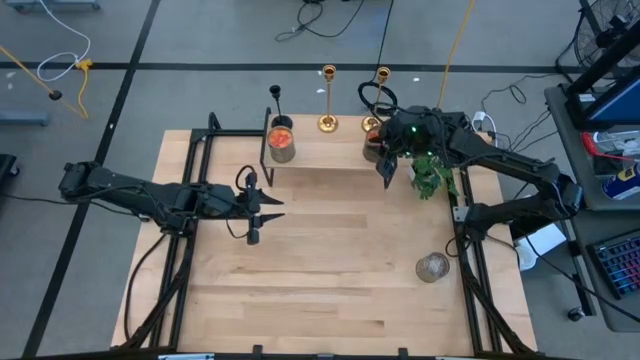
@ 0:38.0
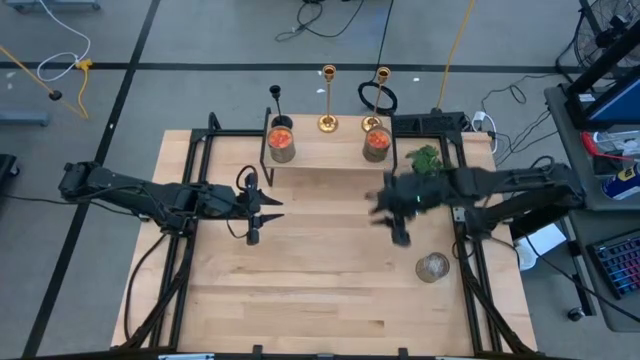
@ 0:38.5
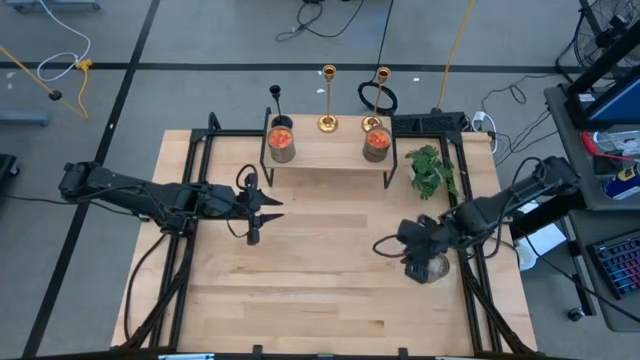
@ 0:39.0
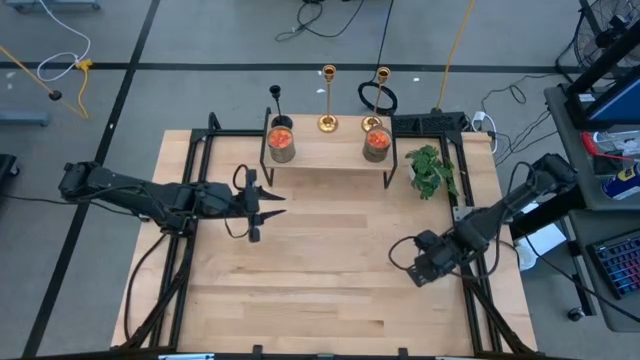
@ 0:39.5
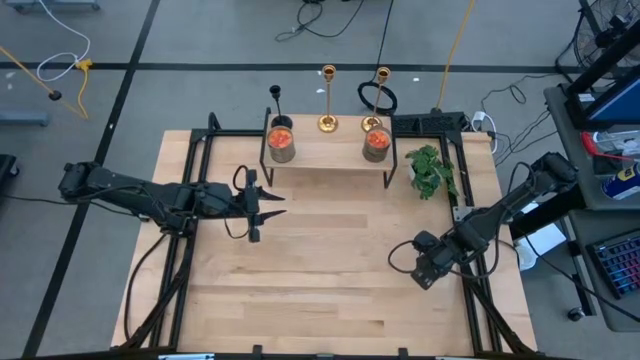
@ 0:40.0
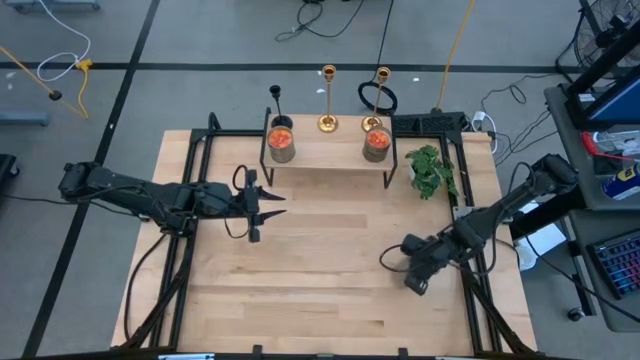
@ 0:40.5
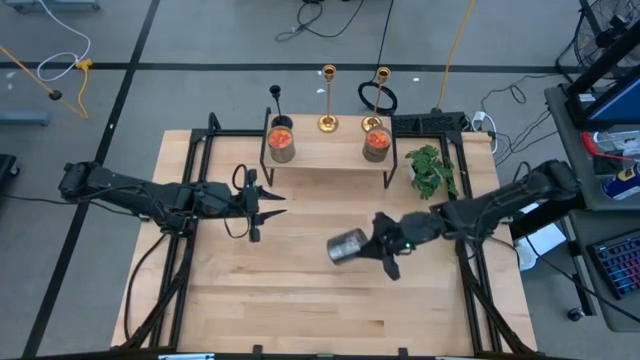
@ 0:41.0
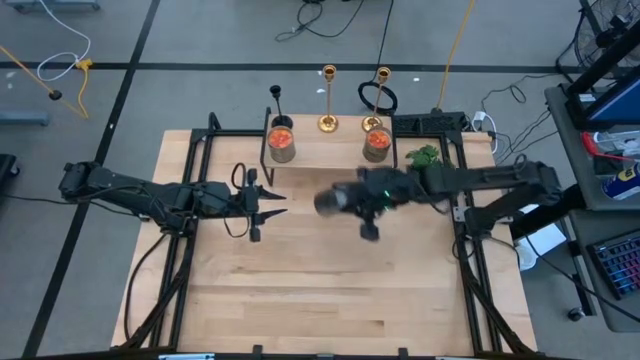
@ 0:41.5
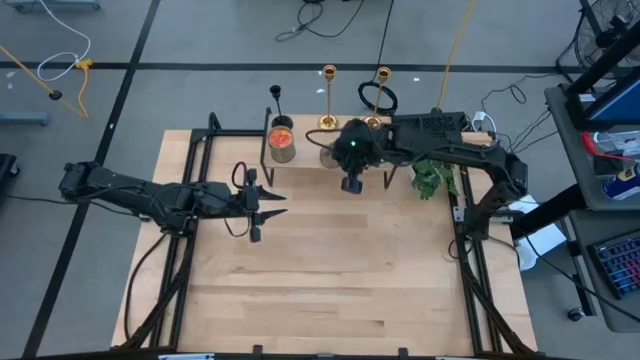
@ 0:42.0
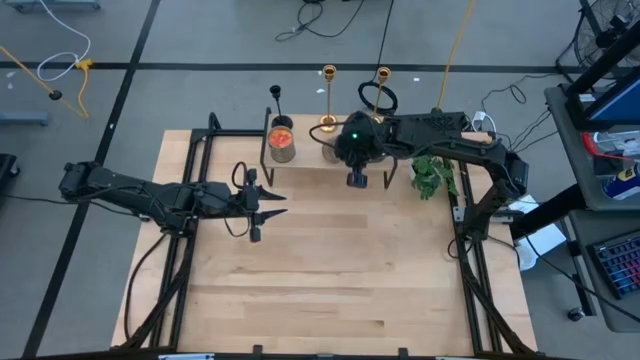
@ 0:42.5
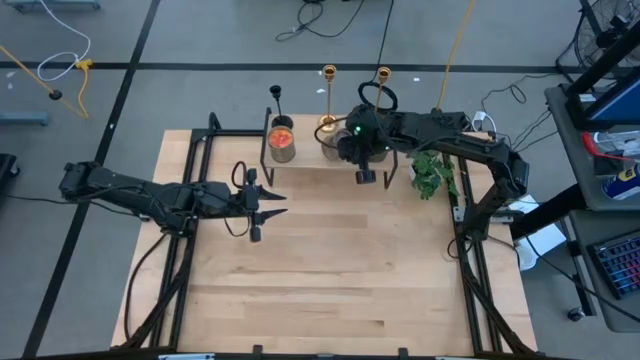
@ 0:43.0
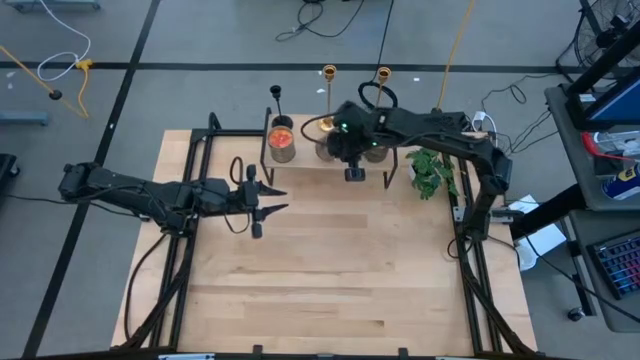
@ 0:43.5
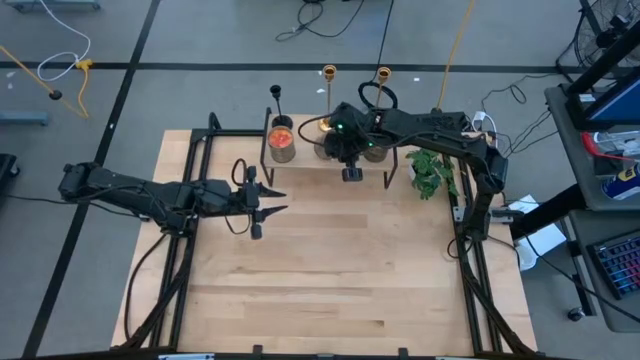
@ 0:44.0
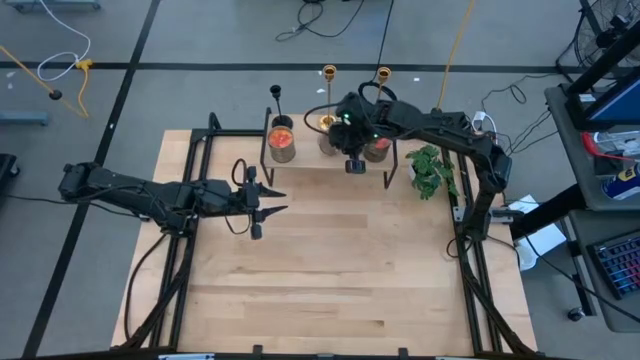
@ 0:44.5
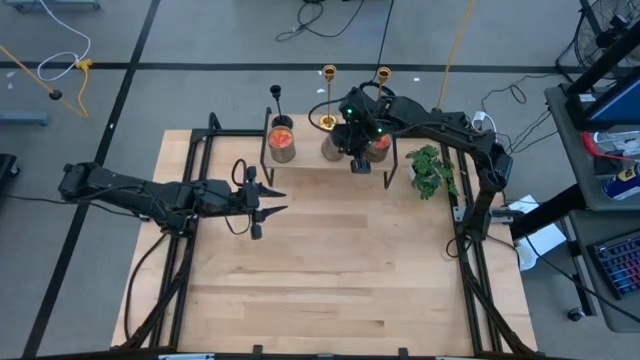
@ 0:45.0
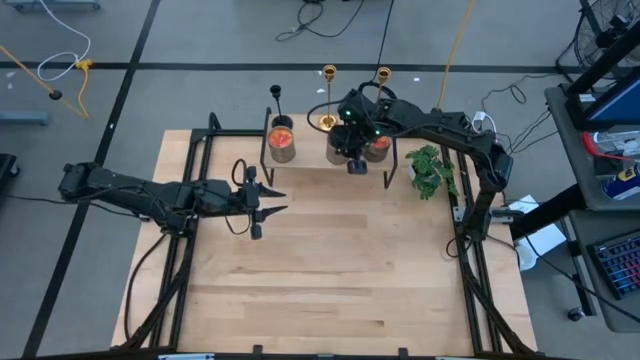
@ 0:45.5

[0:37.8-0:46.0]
Task: Pick & Place candle stick holders
Put the brown scented candle on the shelf

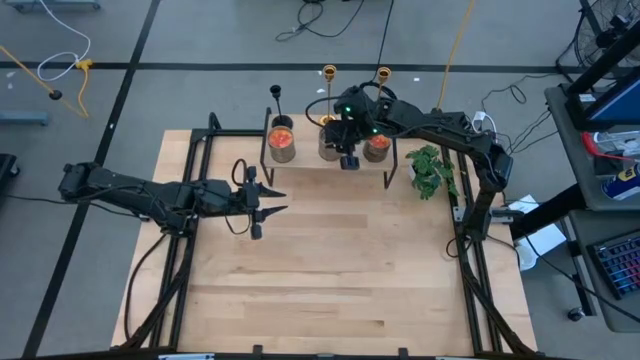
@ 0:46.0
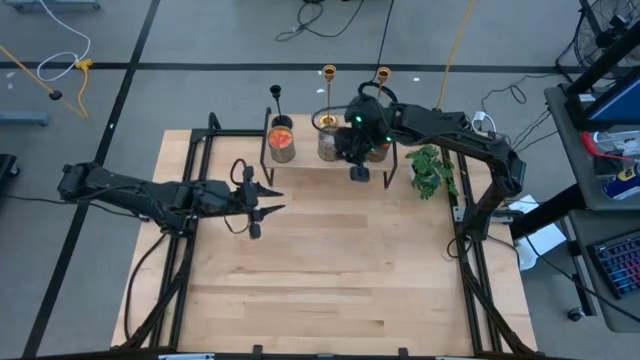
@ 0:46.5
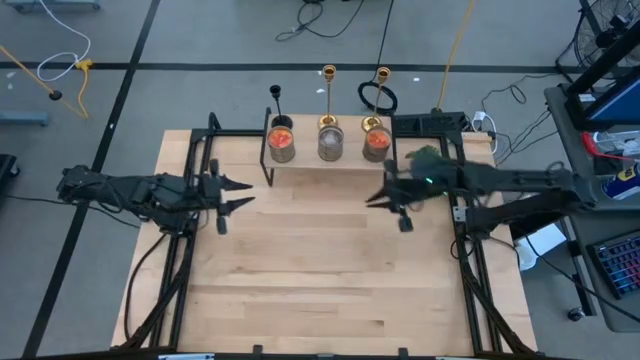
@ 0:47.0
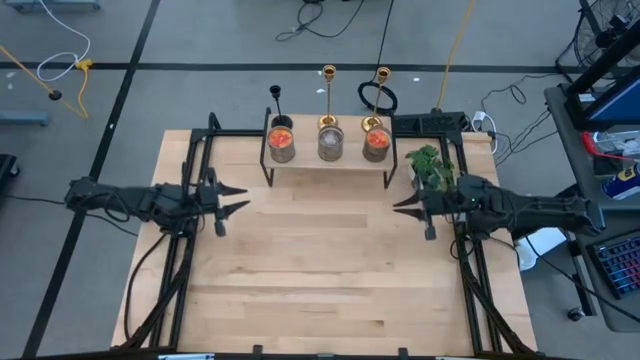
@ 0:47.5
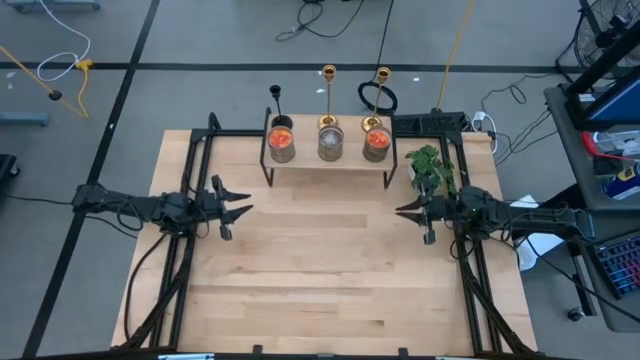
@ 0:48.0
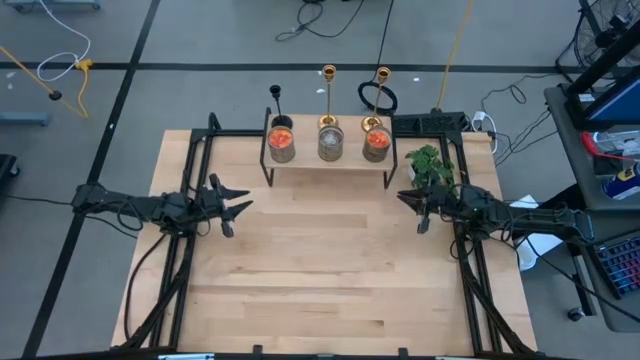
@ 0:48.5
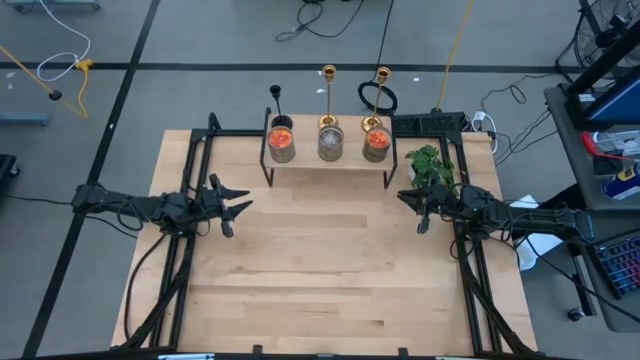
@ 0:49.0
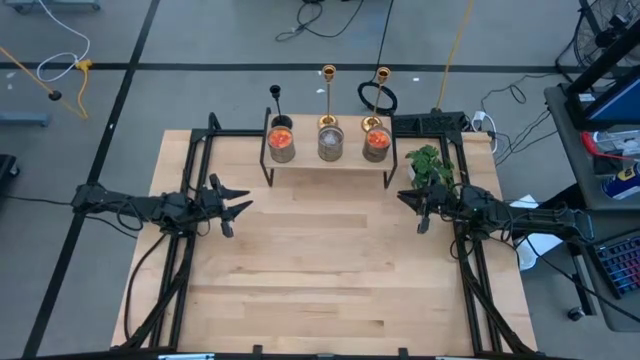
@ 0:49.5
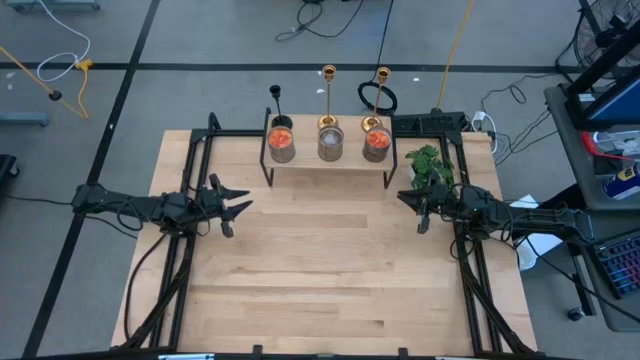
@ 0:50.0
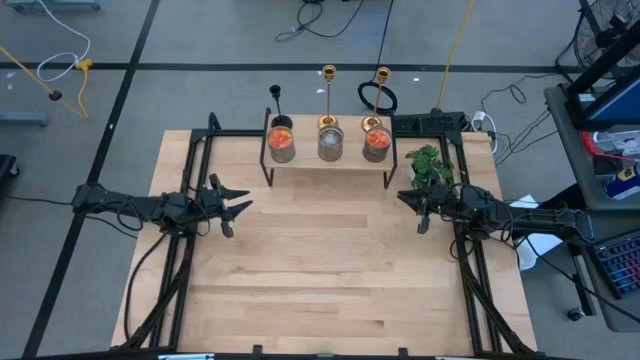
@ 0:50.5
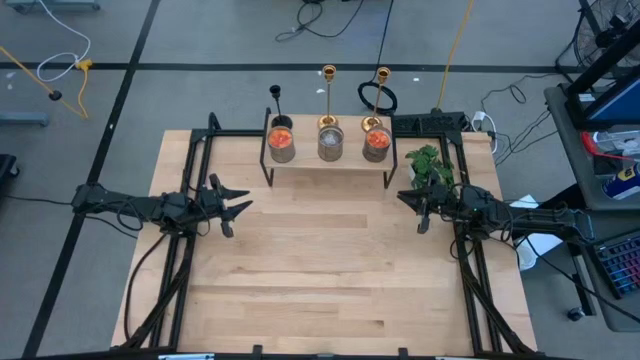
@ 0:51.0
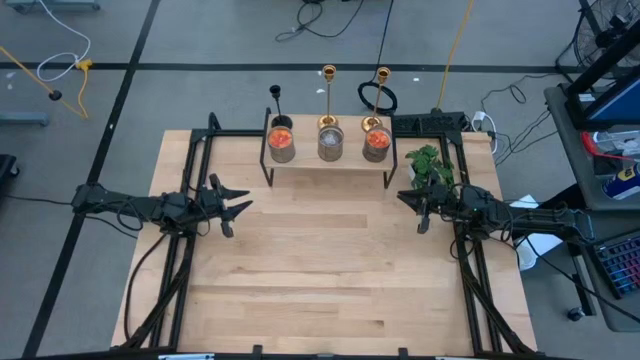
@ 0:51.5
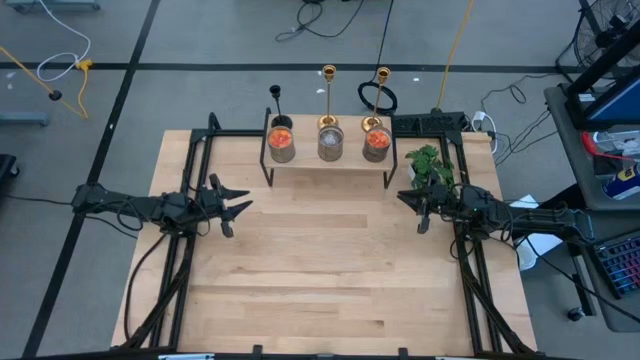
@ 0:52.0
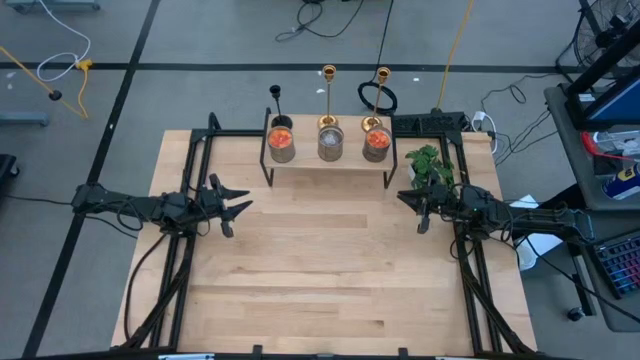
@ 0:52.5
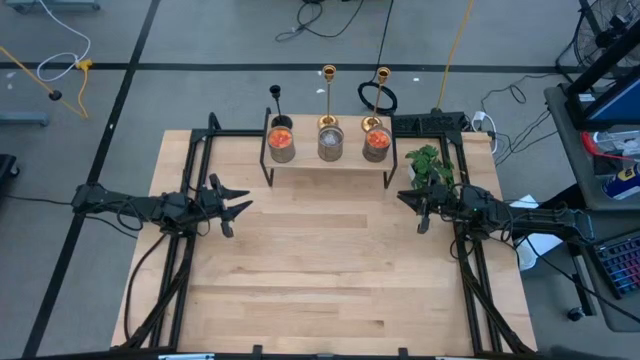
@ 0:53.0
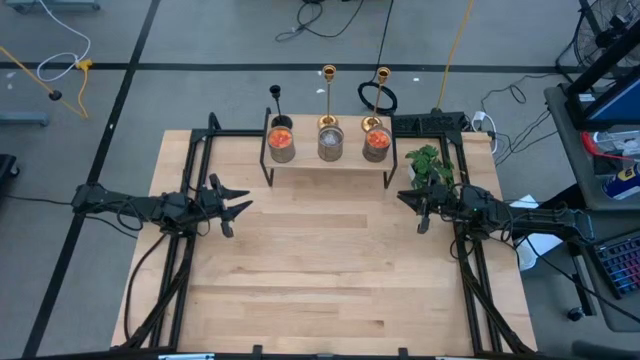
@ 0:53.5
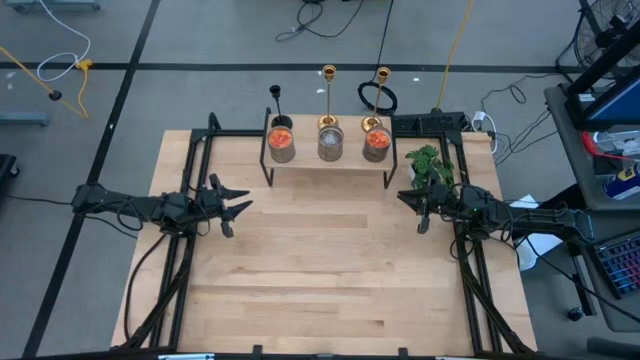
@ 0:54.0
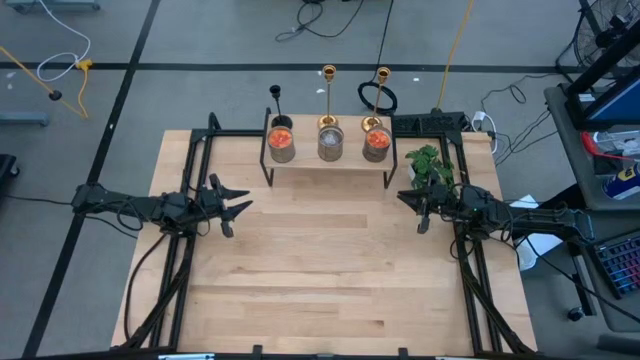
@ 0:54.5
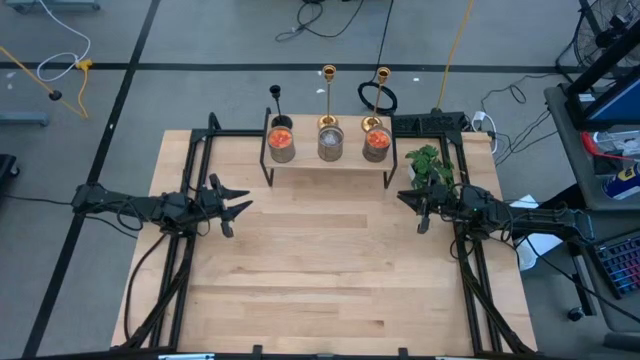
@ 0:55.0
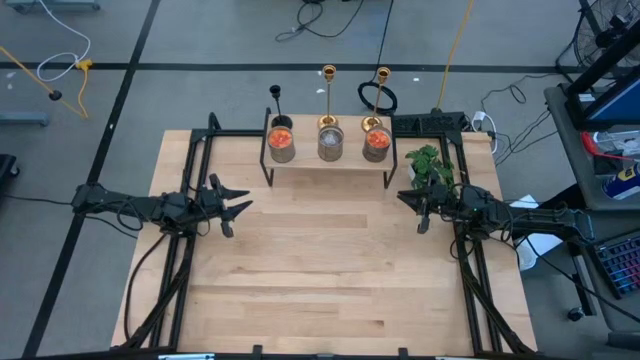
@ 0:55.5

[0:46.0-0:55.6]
Return to Home Position

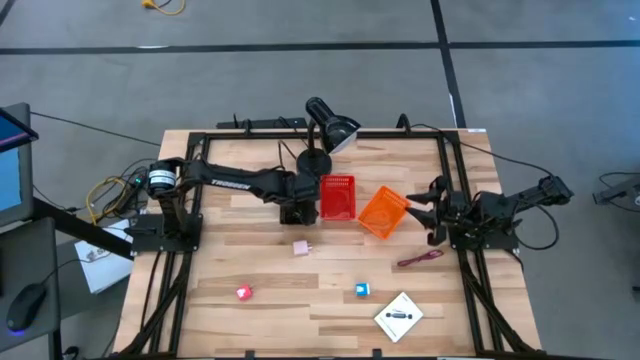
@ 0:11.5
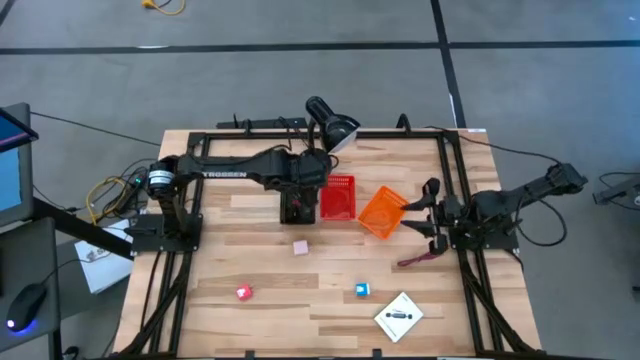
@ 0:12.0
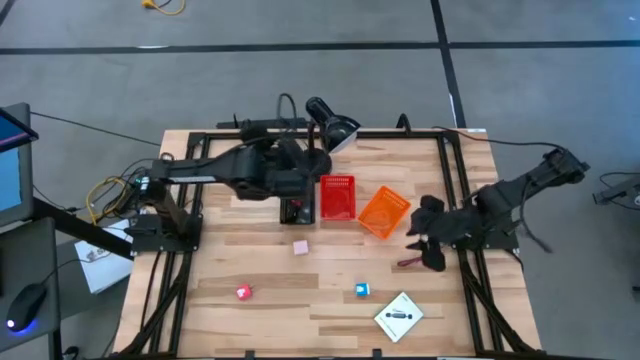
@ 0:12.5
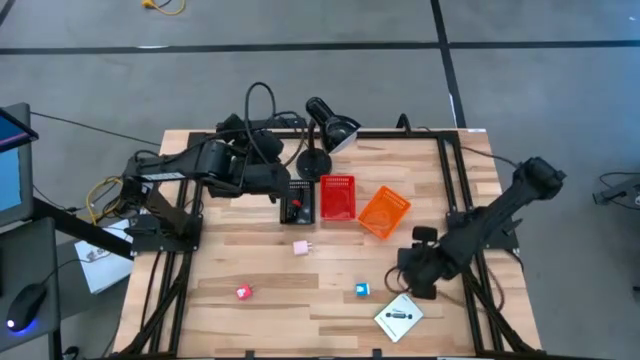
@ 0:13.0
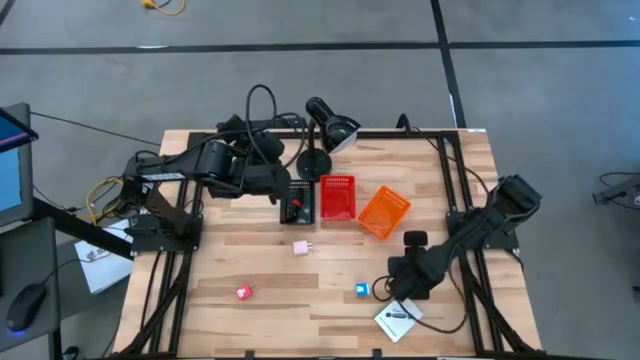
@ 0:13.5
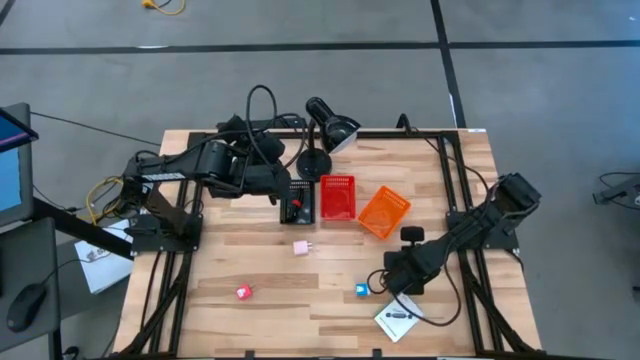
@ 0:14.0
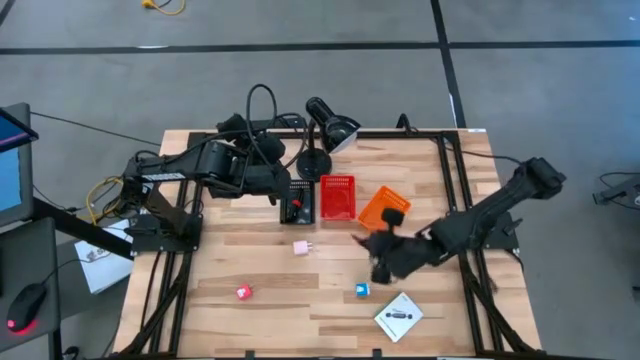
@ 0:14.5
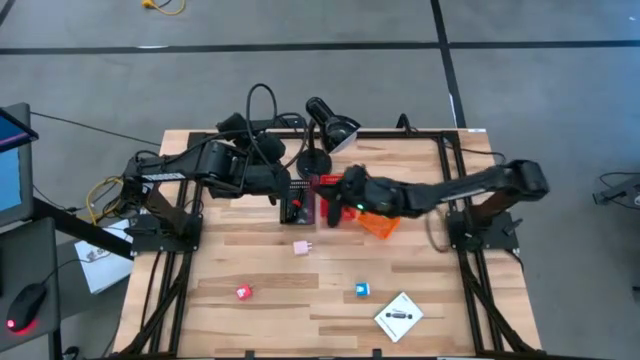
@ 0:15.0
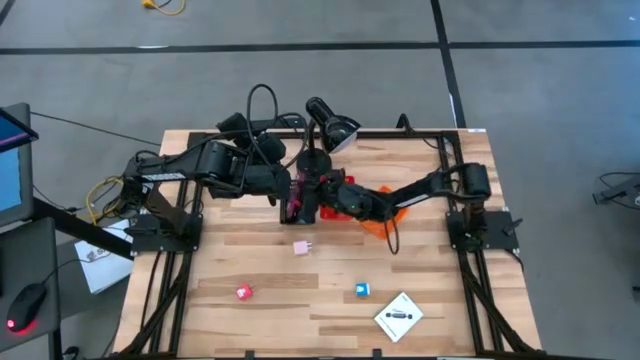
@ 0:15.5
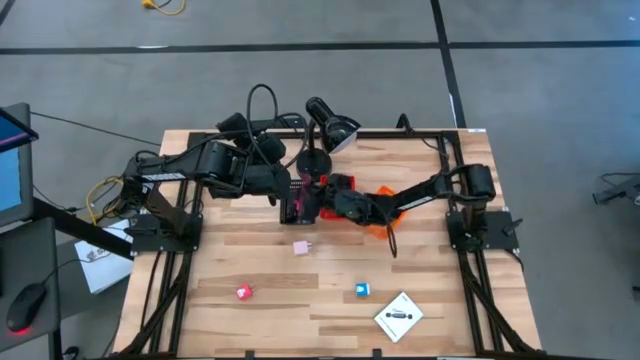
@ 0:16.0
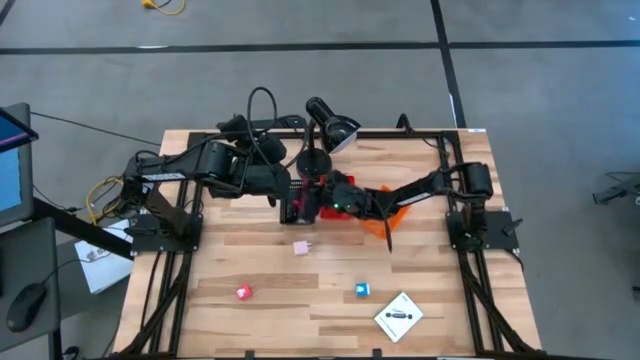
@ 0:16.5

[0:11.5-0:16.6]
Task: Pick and place items into bin
Put the red USB cable into the black bin
